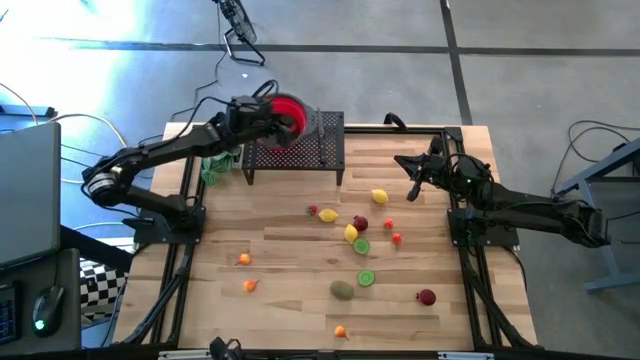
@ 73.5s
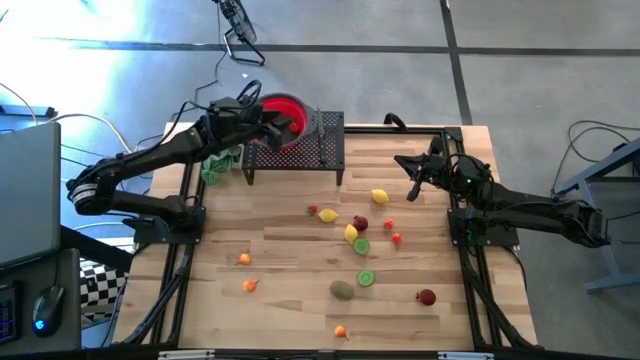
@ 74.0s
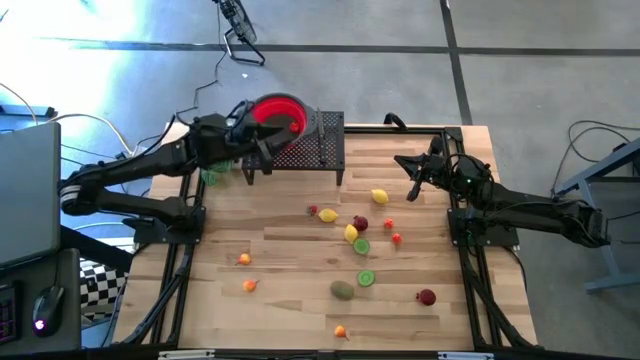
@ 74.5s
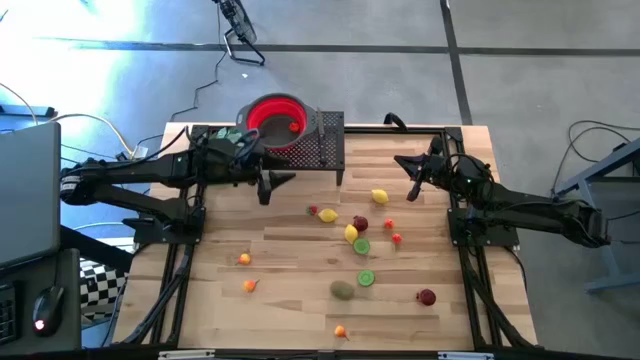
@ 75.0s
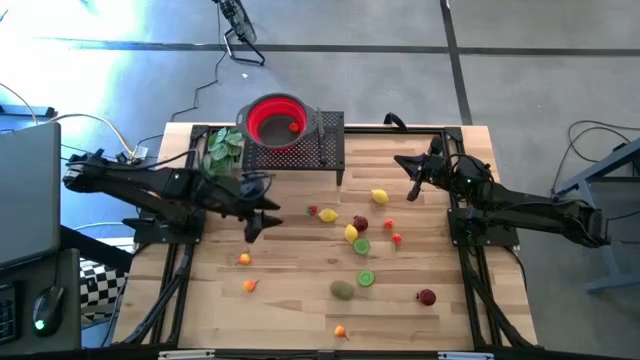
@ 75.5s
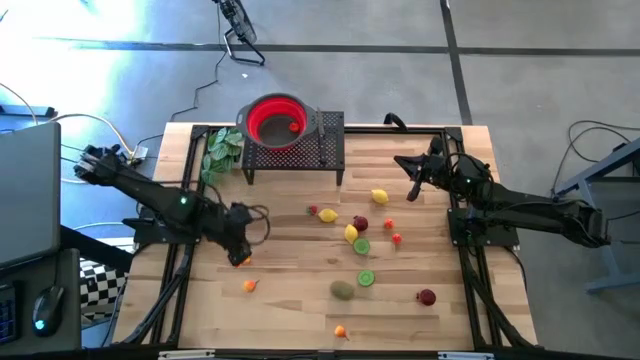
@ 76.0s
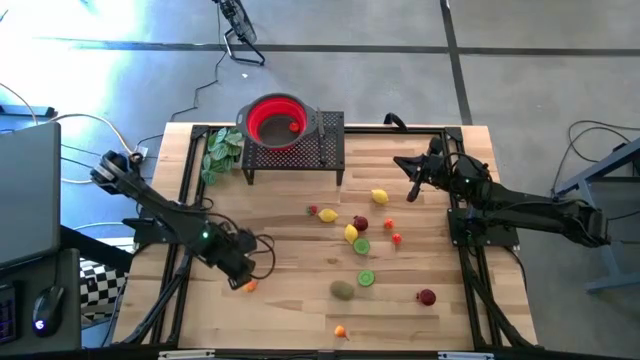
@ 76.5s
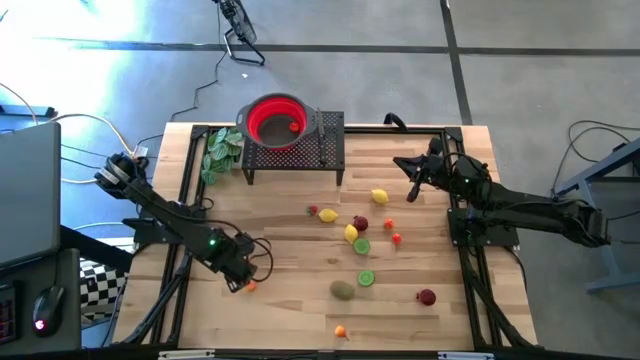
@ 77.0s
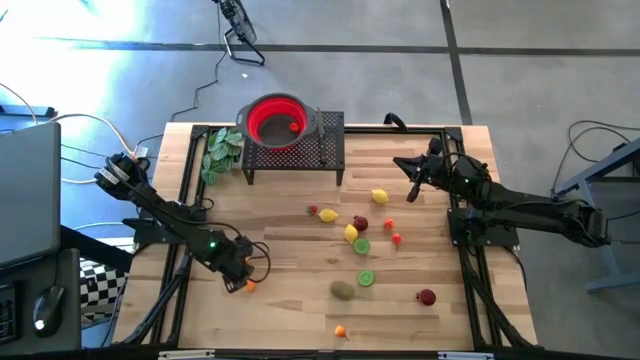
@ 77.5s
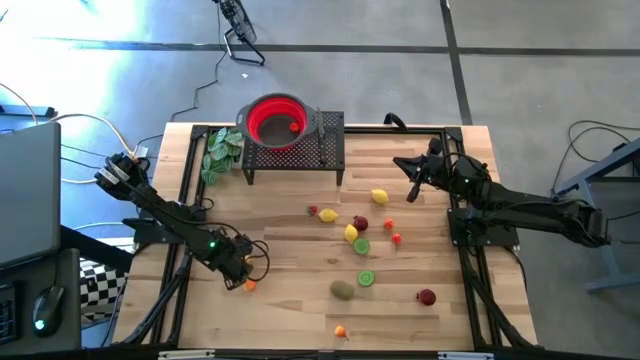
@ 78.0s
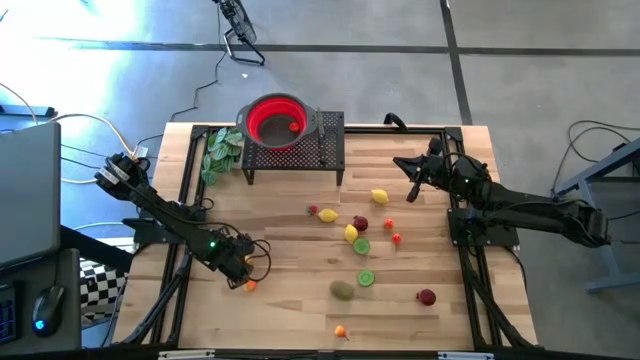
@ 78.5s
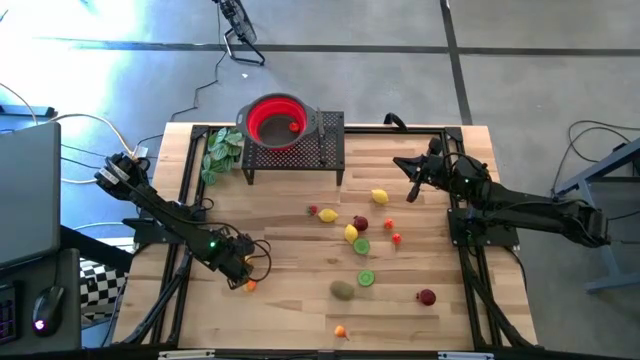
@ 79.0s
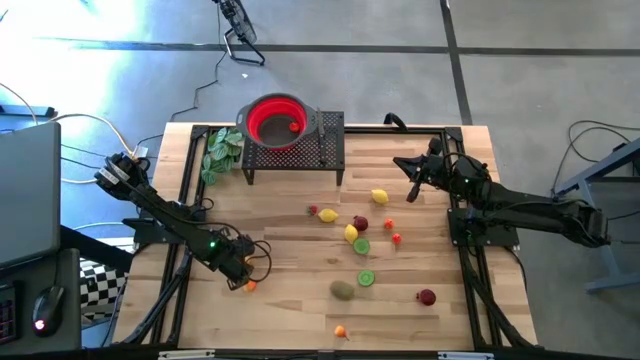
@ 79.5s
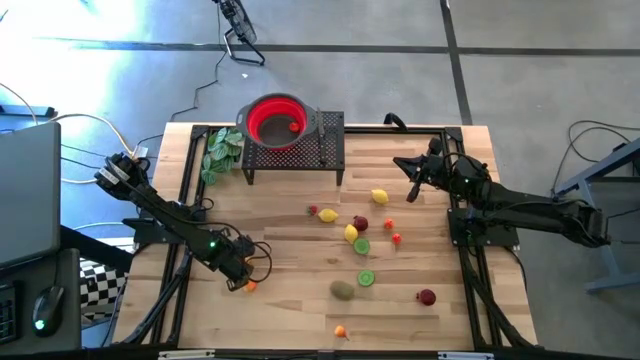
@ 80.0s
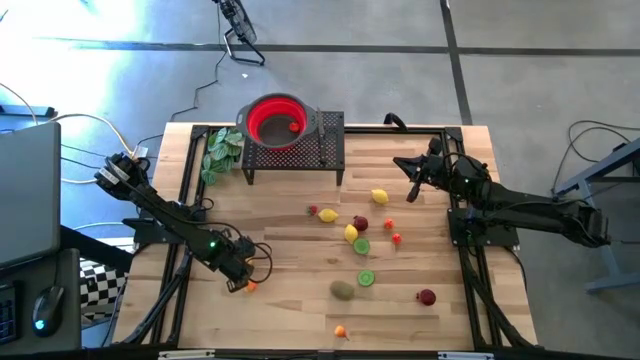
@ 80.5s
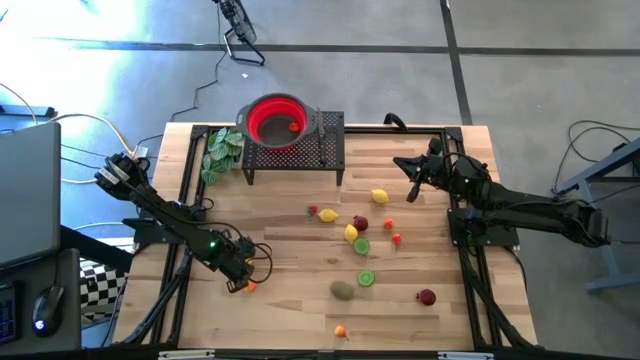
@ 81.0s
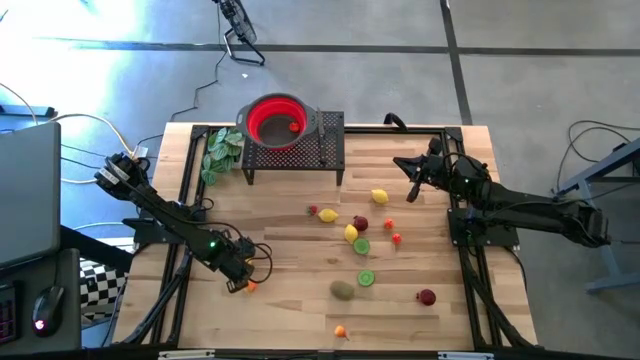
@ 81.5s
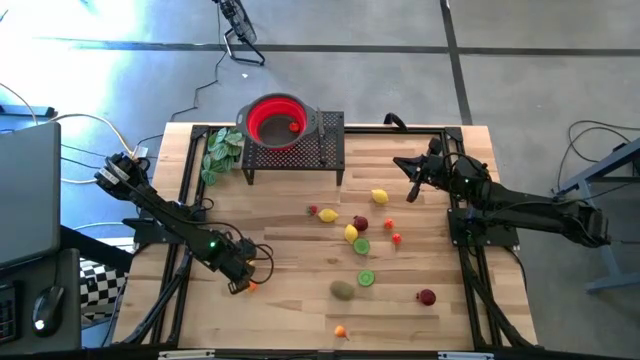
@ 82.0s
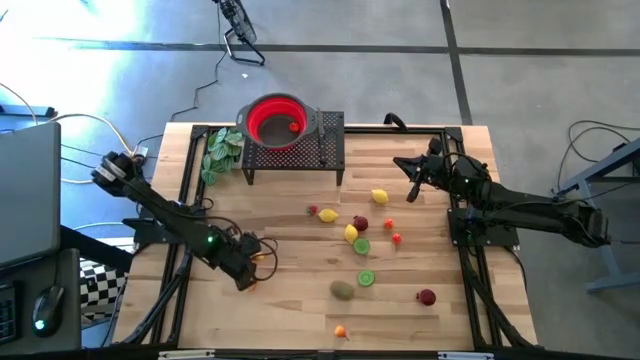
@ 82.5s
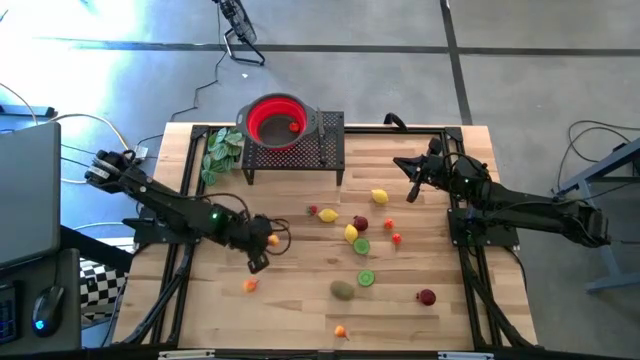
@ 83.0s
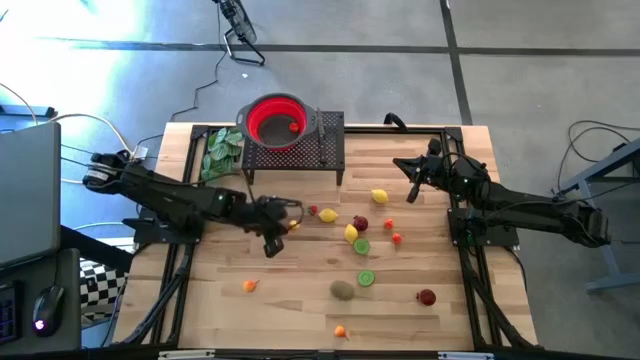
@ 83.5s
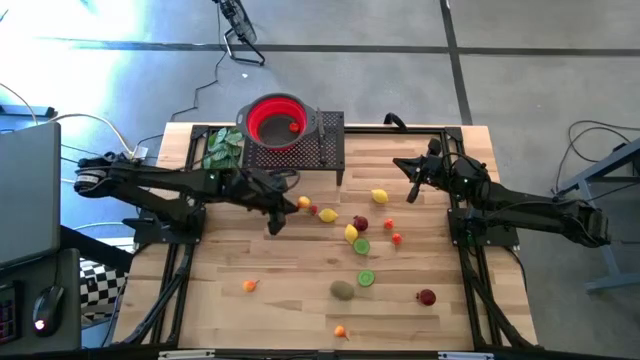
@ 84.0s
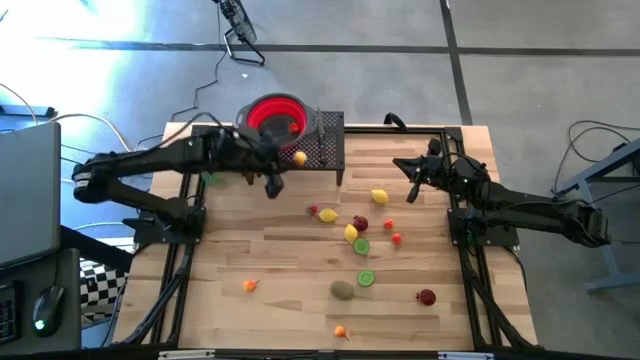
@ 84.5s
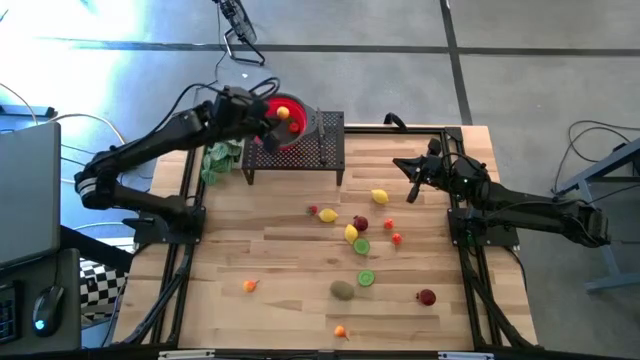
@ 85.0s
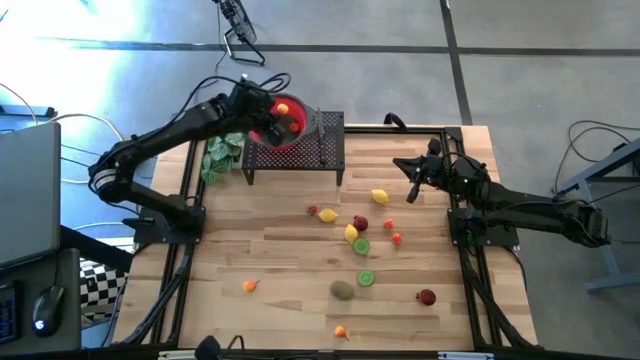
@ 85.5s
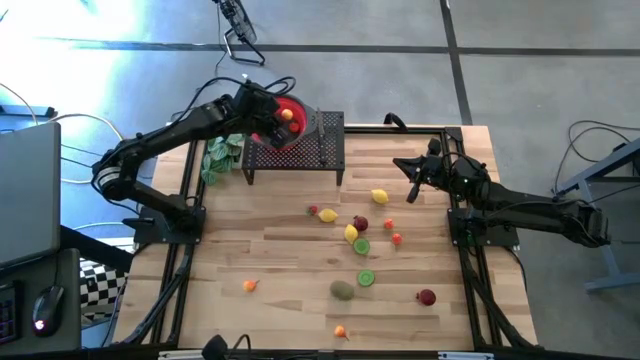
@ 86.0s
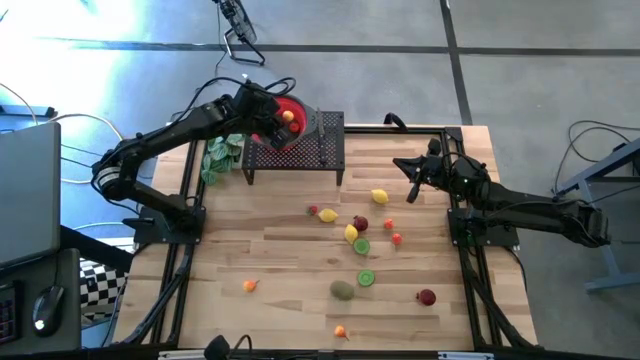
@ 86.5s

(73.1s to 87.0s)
Task: Pick & Place Fruit
Put the orange pear into the red strainer bowl on the shelf
